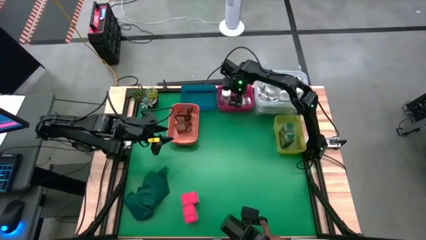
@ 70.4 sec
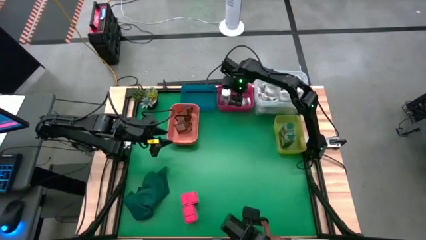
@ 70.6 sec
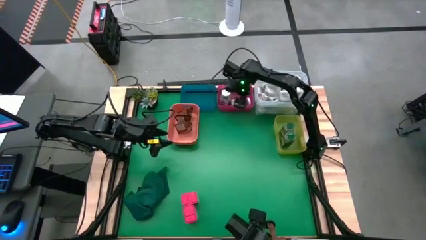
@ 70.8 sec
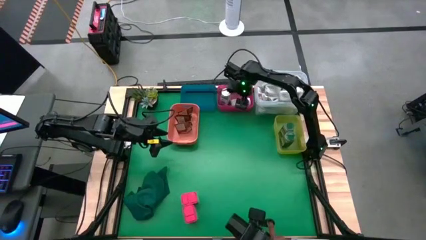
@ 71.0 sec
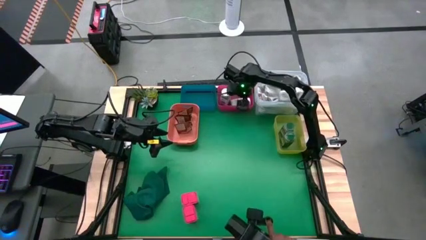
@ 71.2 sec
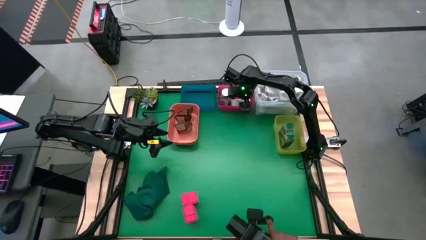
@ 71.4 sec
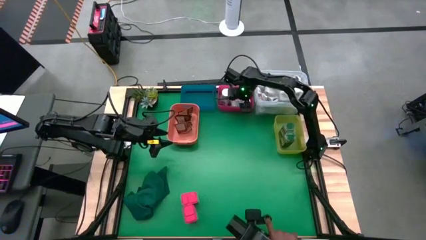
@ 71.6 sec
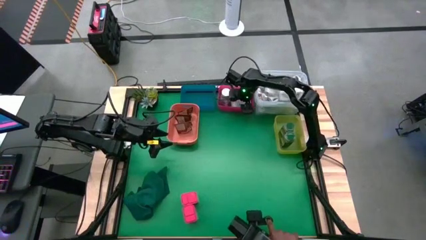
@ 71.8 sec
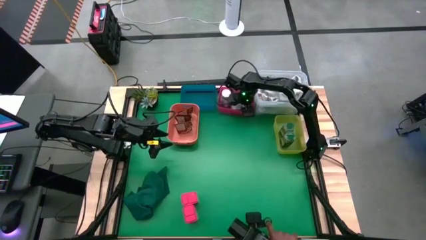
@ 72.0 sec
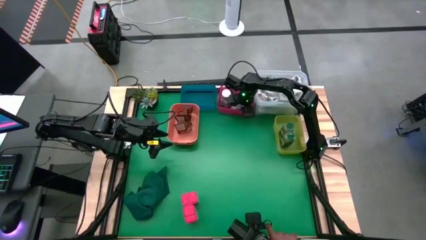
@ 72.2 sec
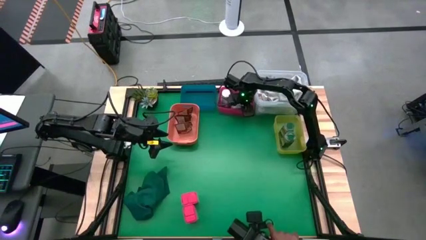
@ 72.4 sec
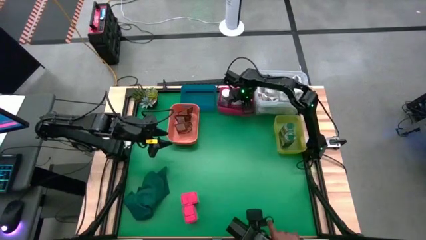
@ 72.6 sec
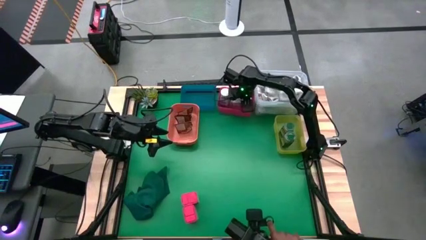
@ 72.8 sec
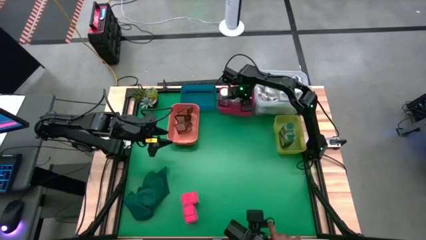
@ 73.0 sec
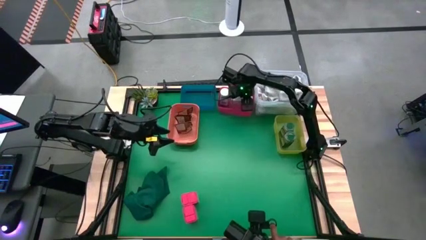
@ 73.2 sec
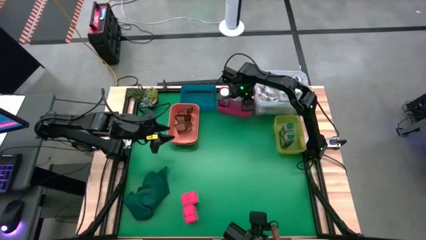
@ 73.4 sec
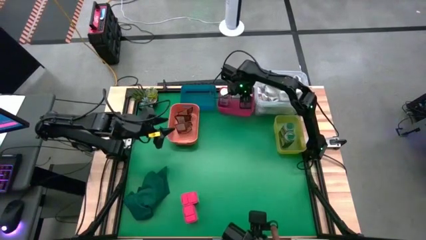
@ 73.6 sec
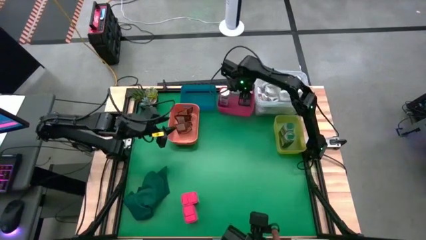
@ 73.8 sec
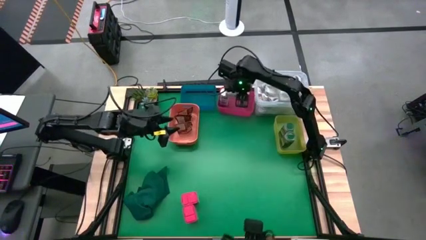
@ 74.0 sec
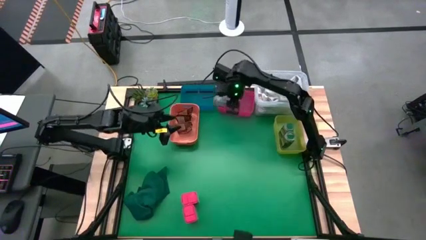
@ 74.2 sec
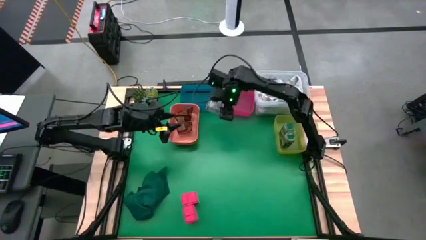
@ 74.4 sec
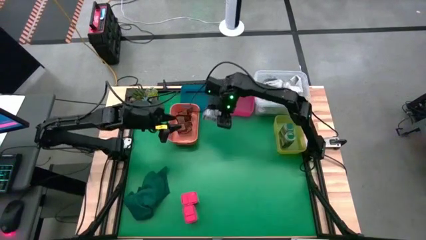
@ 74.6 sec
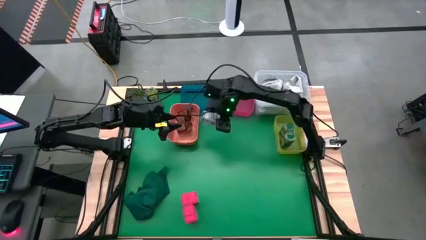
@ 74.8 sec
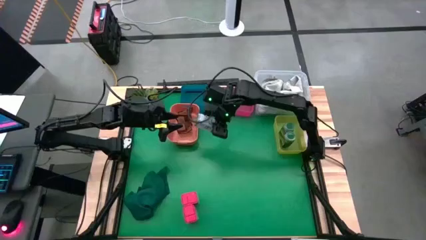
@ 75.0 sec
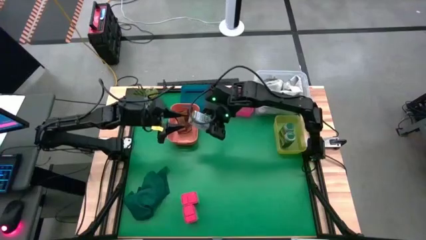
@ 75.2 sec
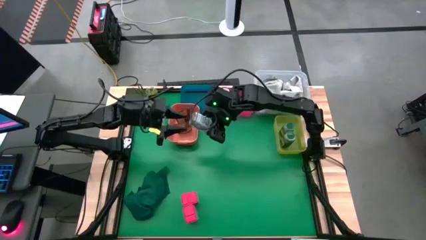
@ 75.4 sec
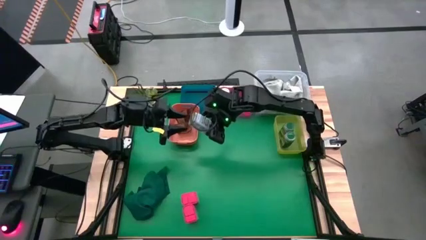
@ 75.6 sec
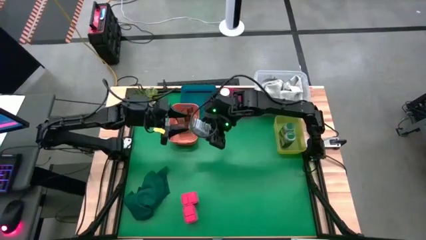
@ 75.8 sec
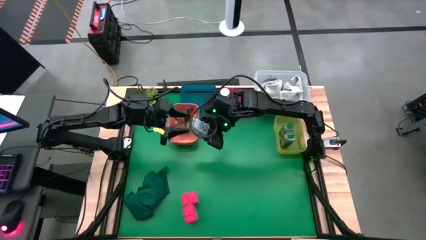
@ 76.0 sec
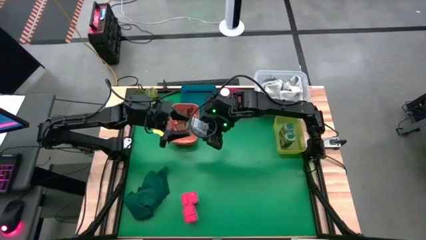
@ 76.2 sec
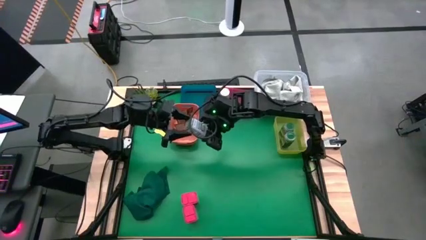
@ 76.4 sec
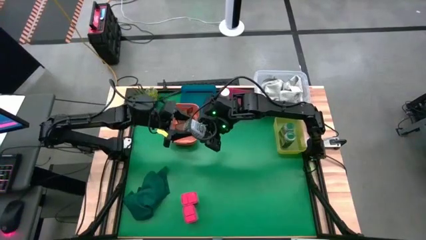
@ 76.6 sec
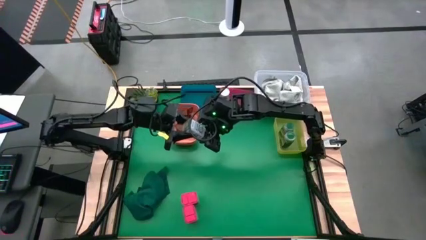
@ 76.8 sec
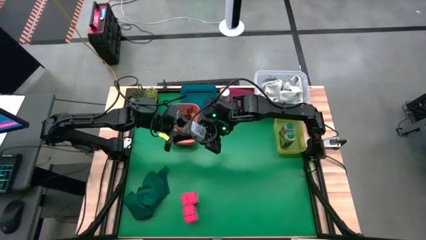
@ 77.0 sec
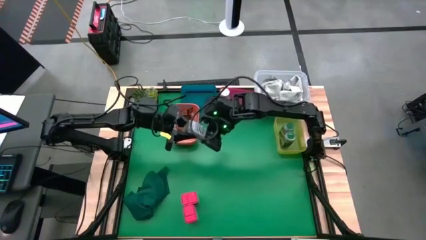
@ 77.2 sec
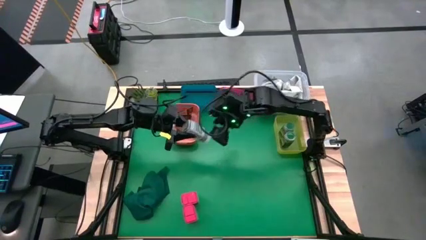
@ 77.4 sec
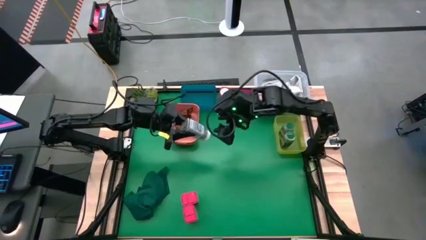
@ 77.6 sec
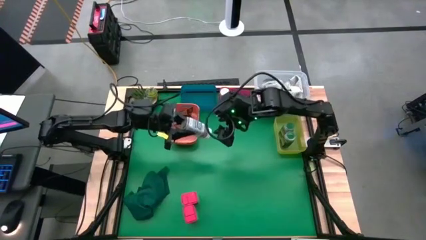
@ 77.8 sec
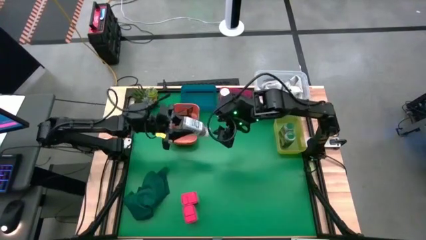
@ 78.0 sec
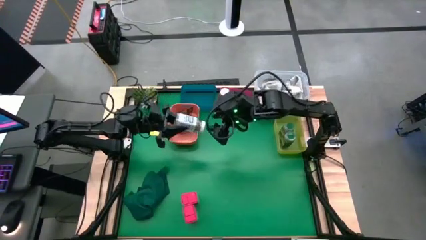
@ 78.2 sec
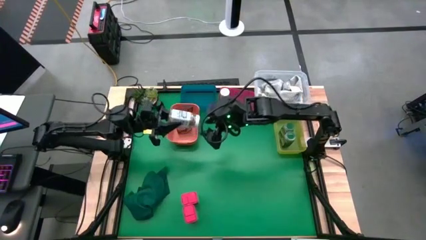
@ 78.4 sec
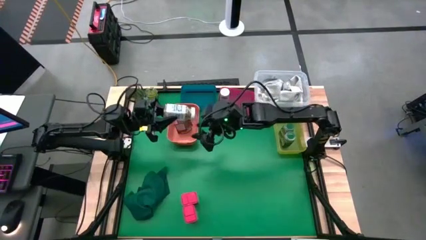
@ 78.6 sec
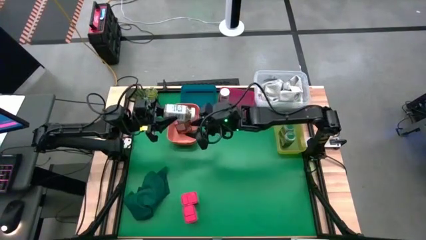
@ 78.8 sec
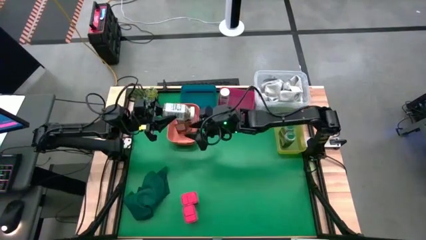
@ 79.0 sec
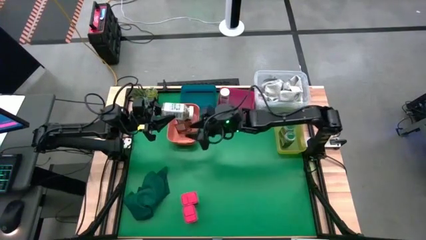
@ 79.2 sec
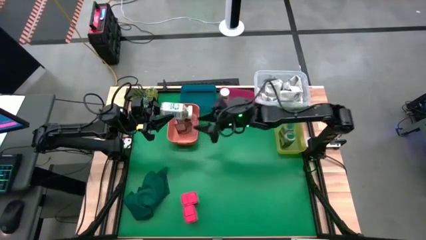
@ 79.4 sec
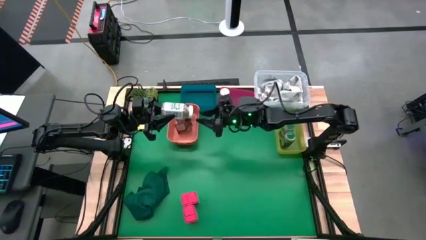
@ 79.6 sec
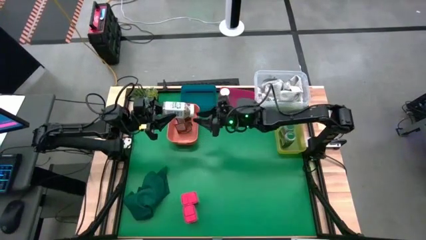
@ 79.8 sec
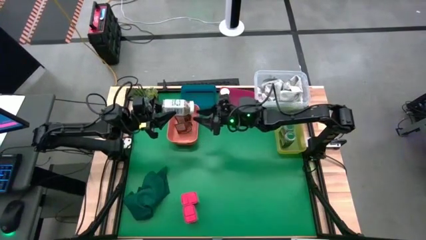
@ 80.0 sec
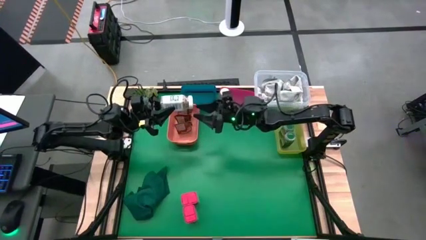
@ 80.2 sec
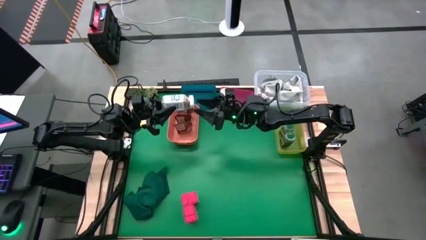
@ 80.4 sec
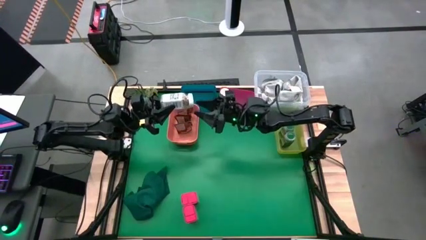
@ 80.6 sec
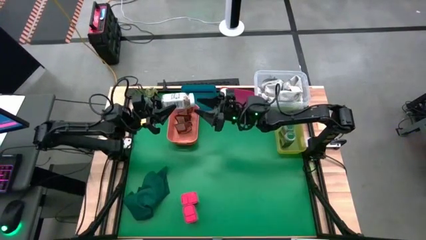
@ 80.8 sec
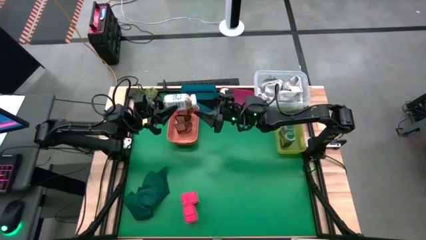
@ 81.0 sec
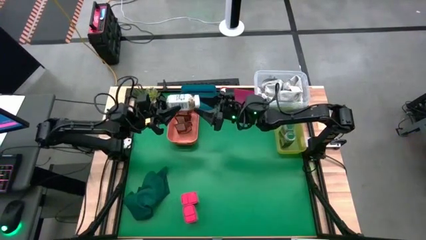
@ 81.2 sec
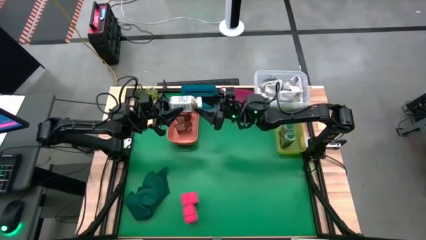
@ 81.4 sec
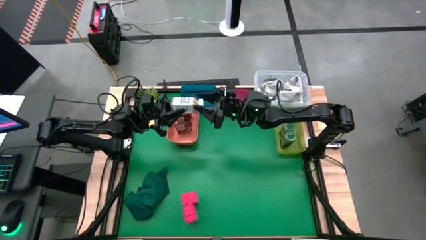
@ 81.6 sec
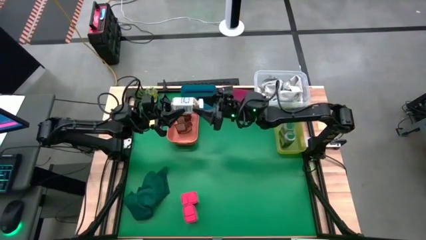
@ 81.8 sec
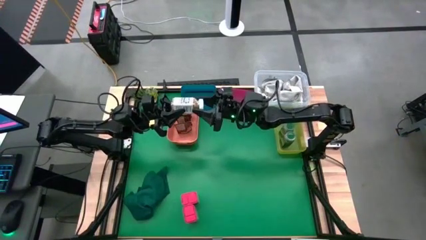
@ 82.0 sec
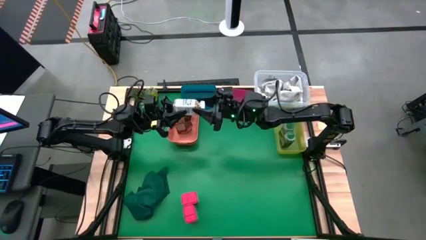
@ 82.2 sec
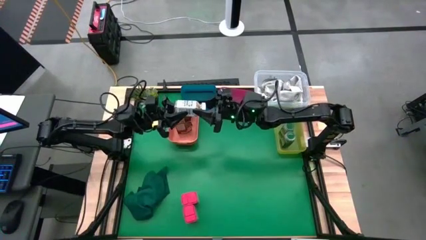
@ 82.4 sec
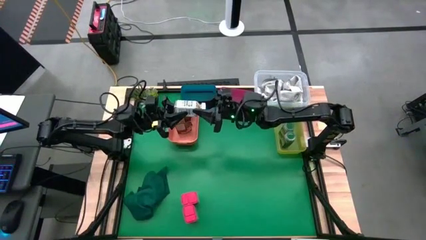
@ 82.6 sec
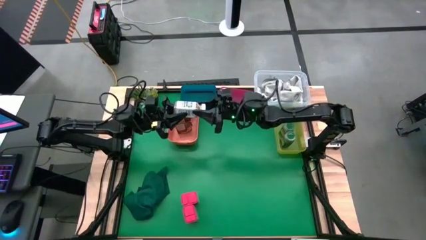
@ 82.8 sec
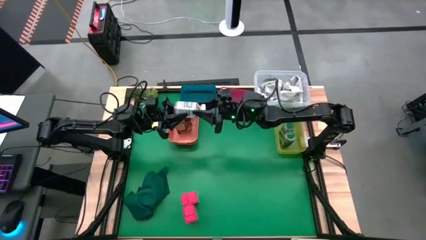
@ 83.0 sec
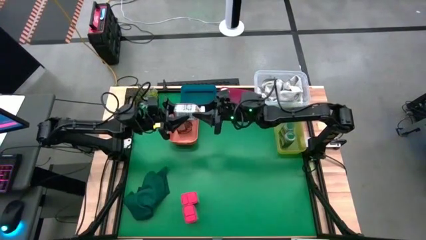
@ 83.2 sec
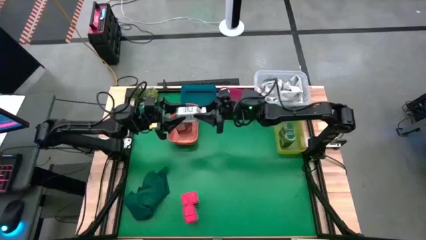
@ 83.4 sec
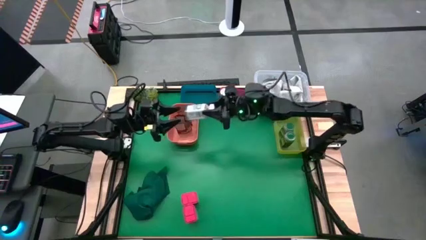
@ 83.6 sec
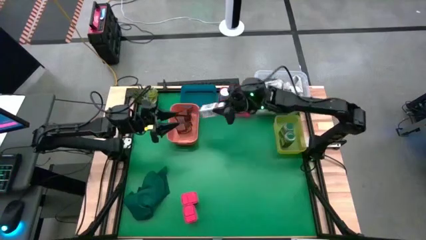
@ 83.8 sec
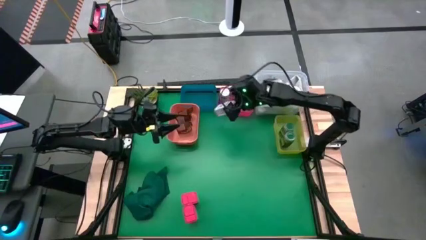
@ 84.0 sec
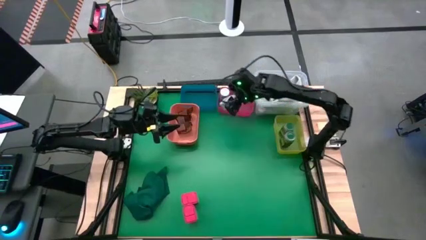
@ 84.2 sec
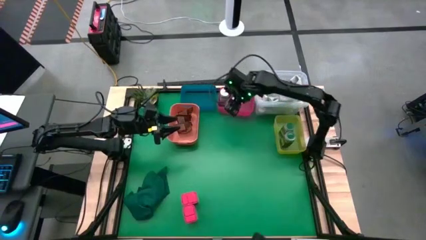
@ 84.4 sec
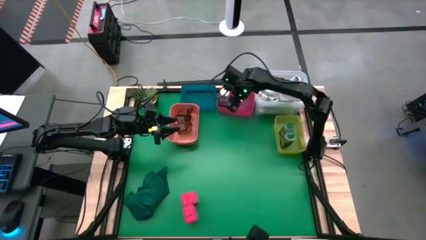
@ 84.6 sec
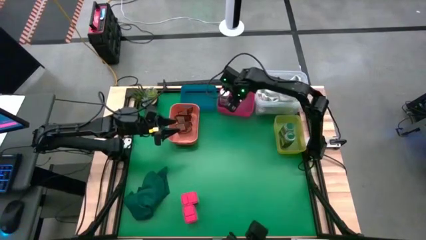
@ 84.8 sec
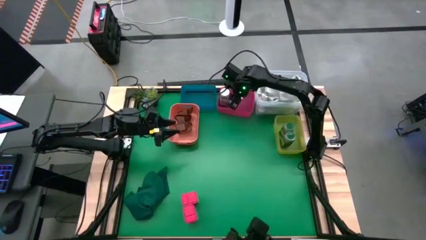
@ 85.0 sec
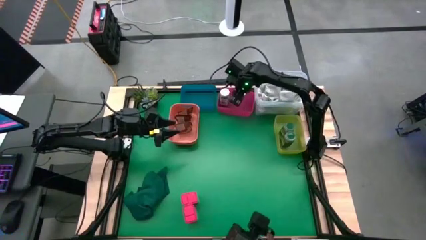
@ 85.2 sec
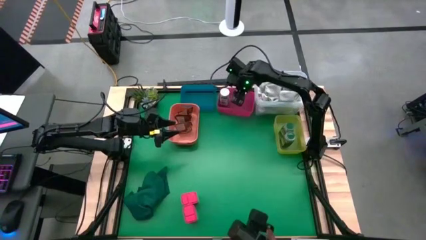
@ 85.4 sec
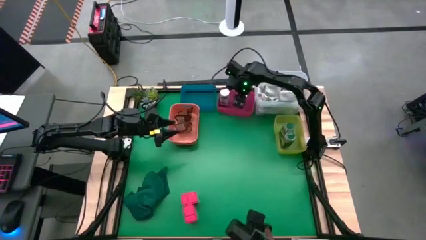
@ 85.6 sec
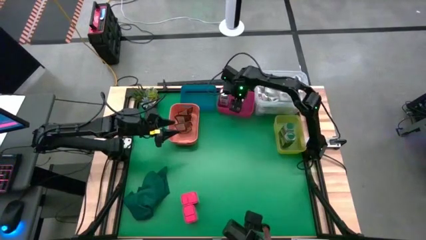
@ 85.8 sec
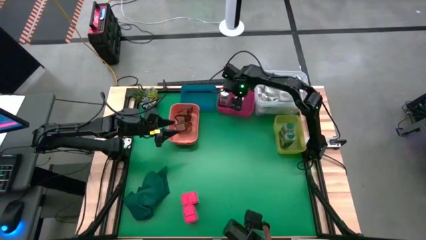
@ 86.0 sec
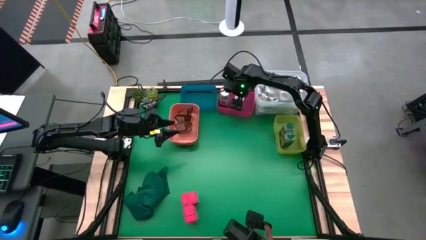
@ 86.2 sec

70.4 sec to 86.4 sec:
Task: Sort spices by type
Put the white spice bottle into the red bin
